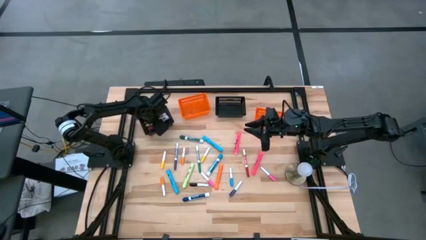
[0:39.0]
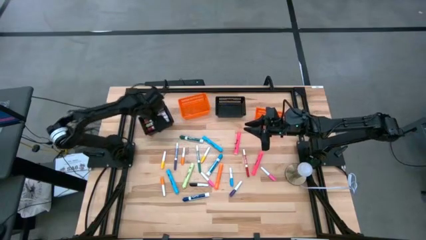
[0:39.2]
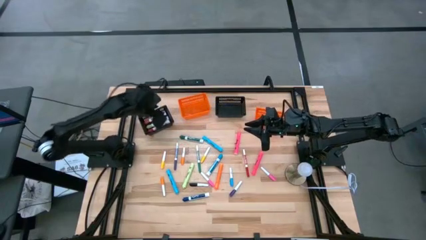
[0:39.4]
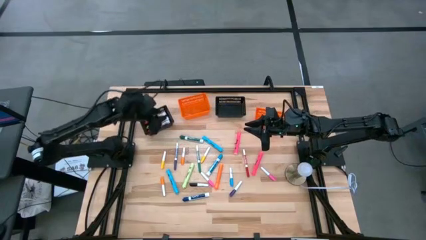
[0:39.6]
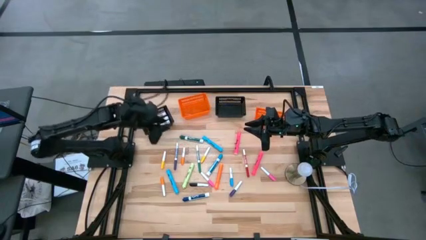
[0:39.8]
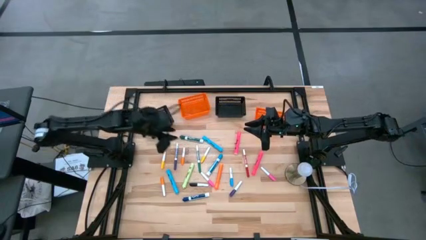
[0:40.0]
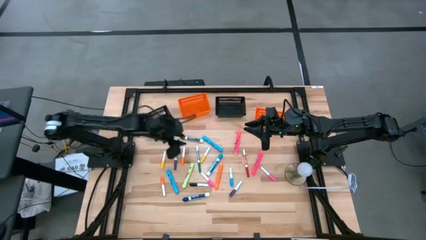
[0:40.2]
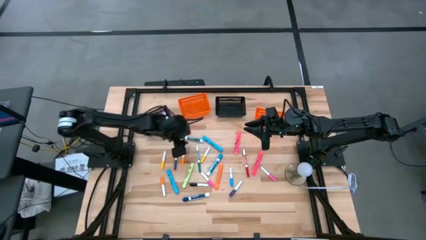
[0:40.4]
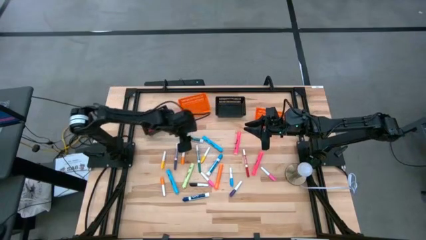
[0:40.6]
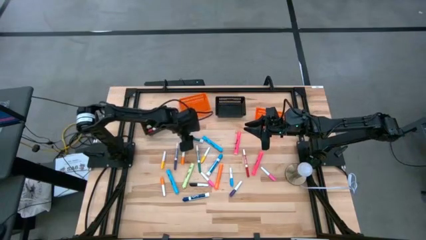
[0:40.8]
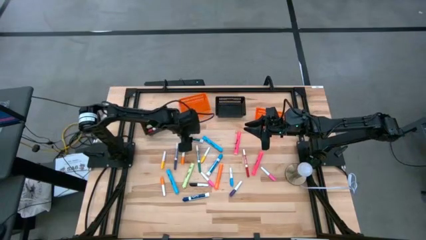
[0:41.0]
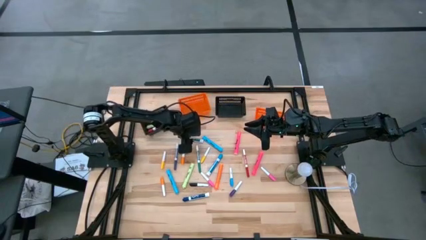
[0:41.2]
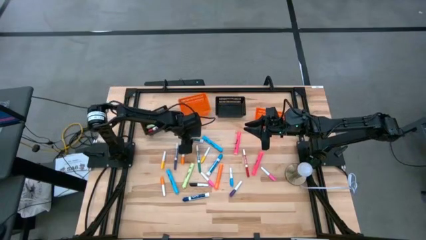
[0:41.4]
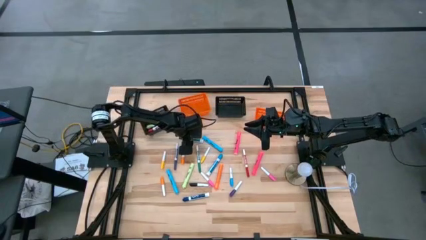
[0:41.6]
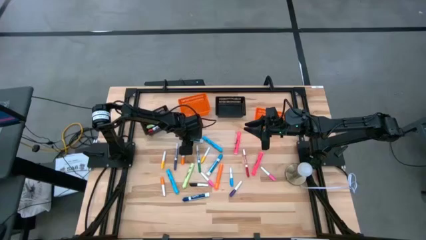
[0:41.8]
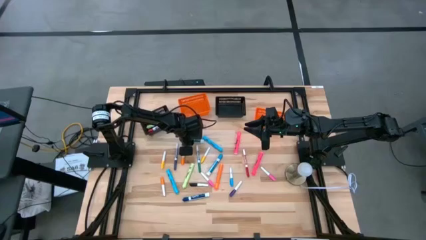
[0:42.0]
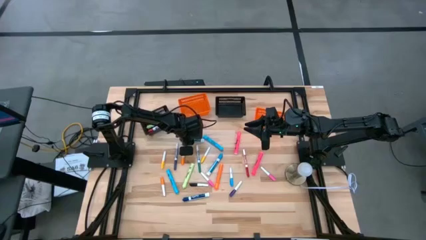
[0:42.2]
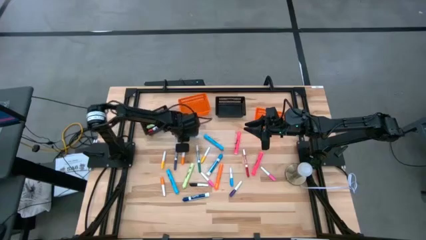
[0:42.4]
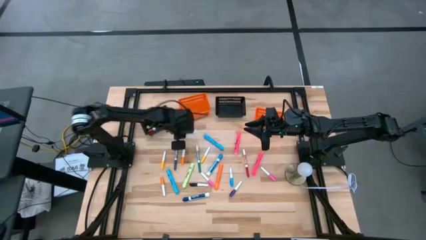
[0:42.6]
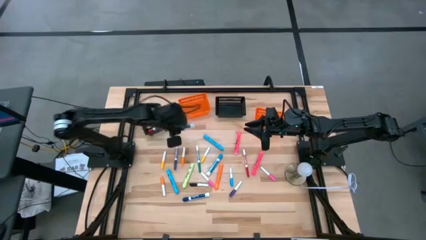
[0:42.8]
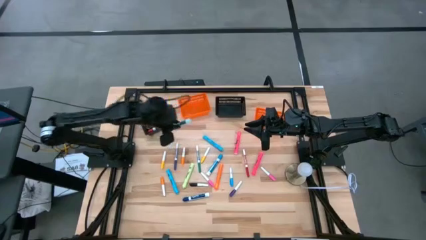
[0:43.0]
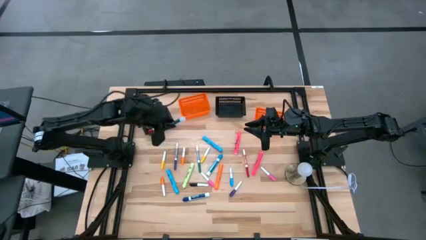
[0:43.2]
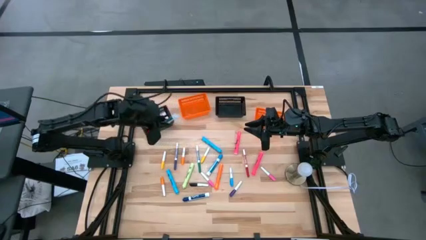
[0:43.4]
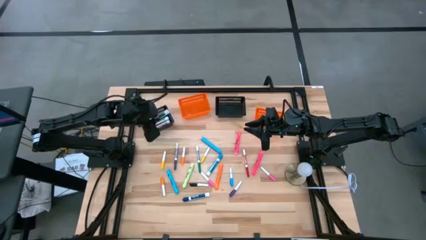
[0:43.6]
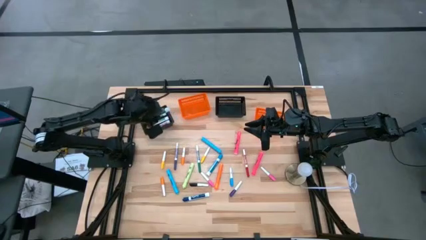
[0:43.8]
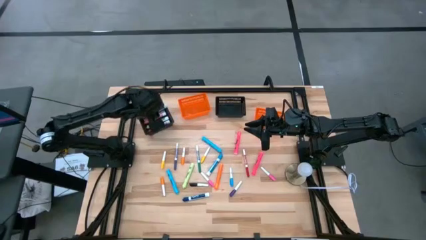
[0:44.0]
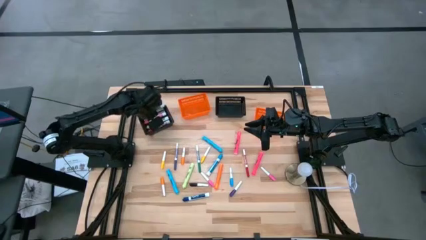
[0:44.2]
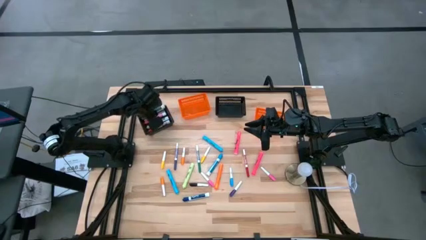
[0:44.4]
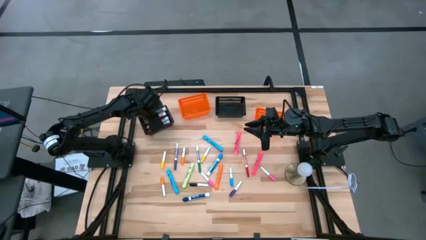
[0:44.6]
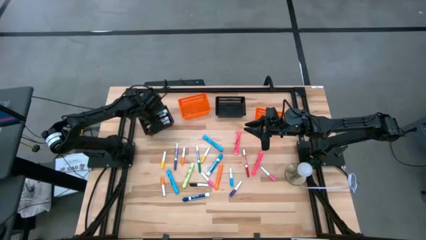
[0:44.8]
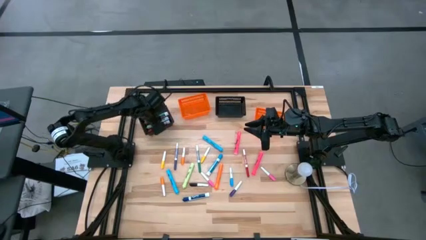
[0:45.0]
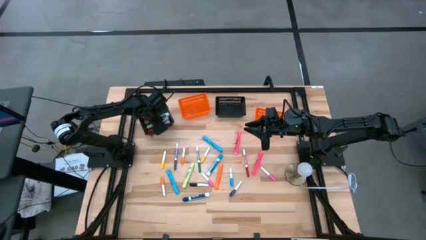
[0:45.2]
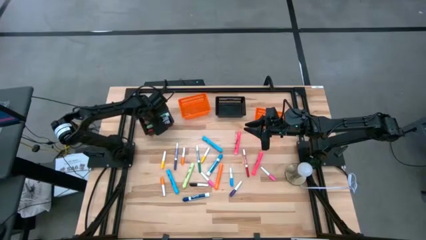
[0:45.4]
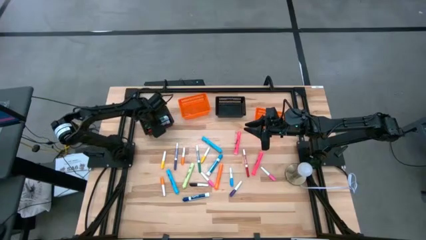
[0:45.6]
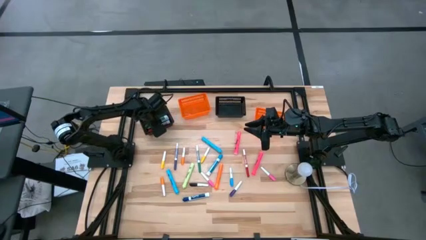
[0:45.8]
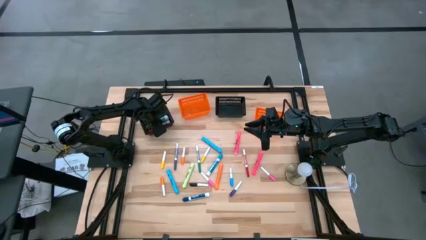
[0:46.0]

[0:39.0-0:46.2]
Task: Pick & Place Markers
Put the large green marker pen into the left black bin

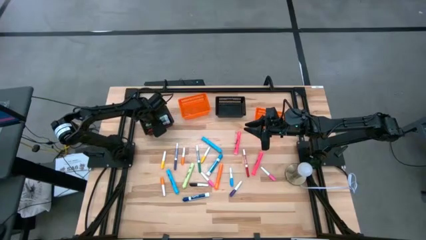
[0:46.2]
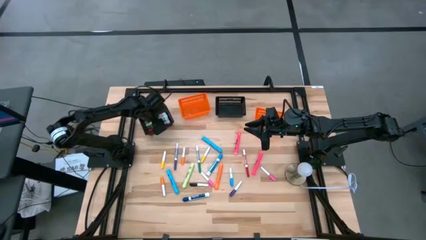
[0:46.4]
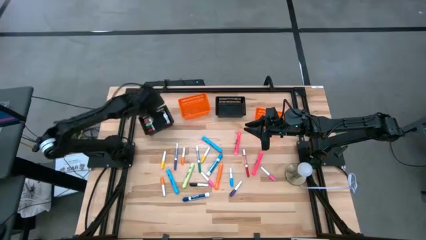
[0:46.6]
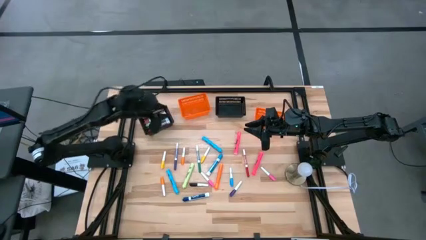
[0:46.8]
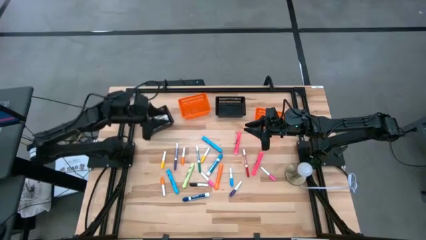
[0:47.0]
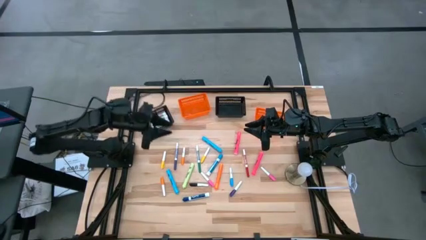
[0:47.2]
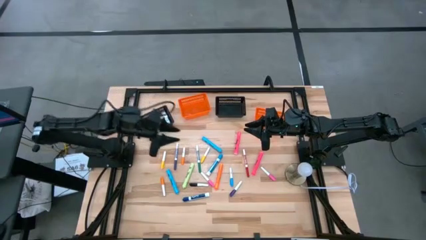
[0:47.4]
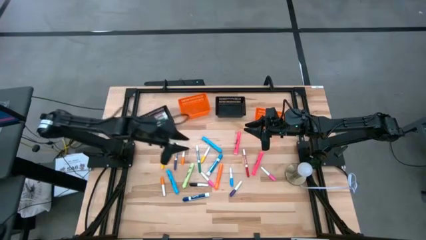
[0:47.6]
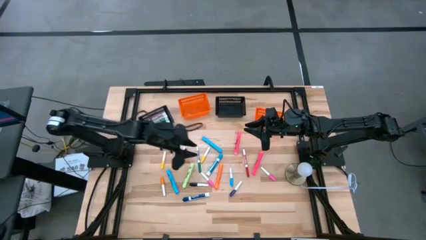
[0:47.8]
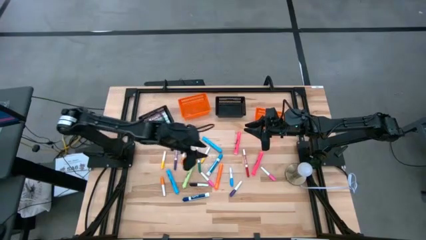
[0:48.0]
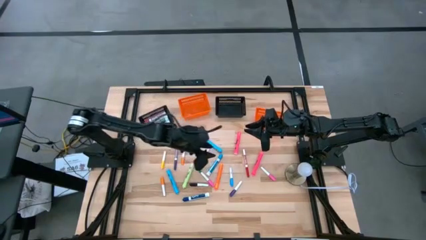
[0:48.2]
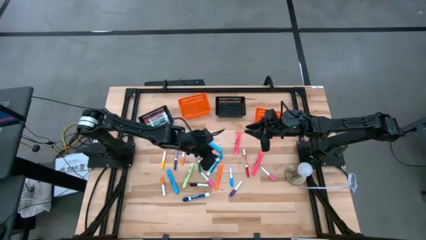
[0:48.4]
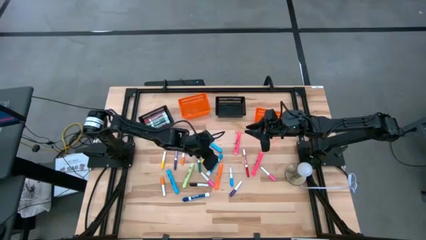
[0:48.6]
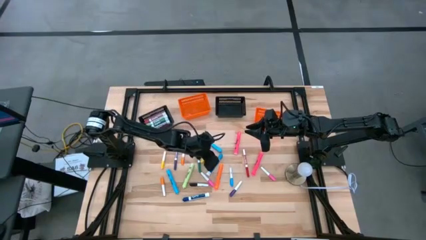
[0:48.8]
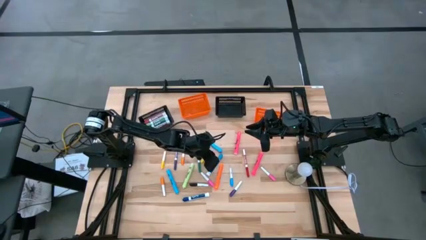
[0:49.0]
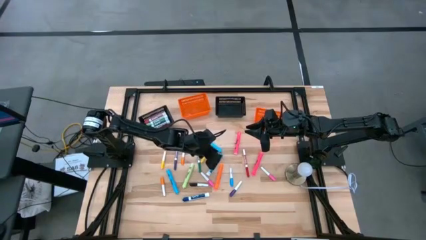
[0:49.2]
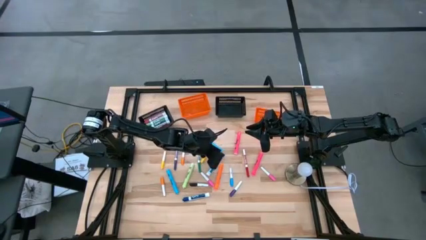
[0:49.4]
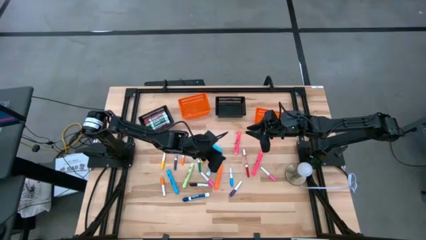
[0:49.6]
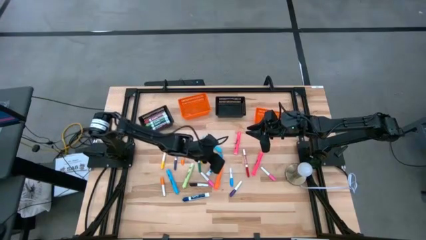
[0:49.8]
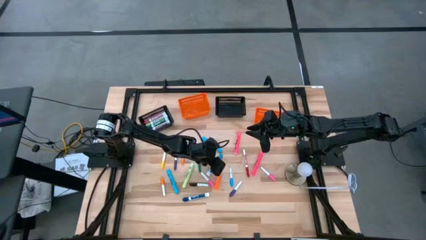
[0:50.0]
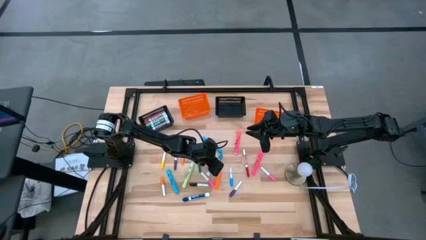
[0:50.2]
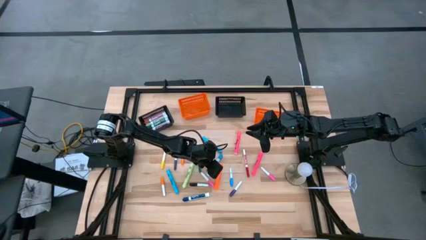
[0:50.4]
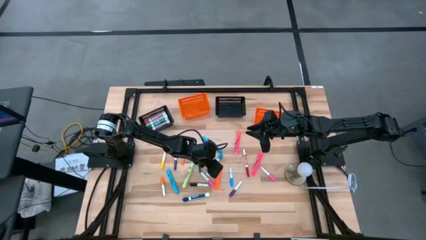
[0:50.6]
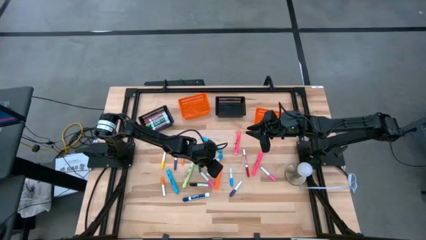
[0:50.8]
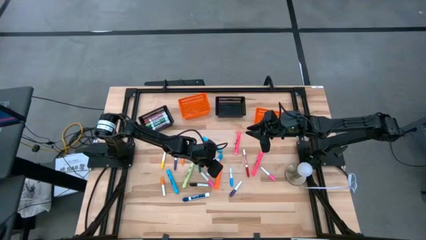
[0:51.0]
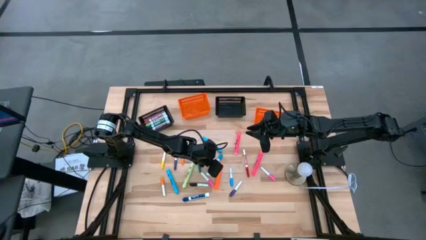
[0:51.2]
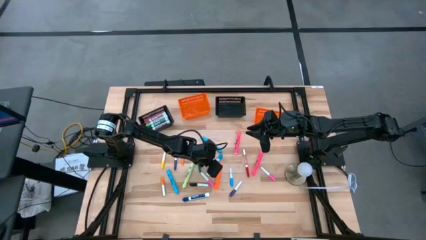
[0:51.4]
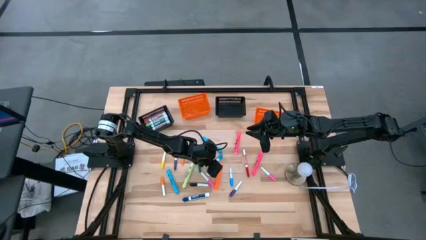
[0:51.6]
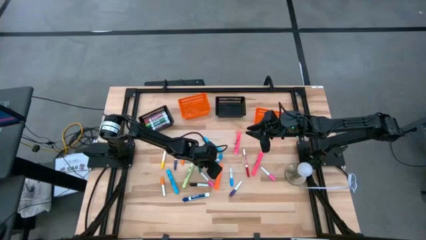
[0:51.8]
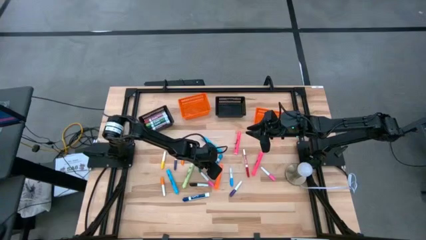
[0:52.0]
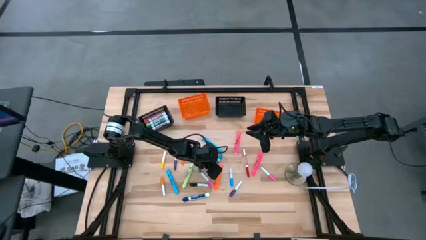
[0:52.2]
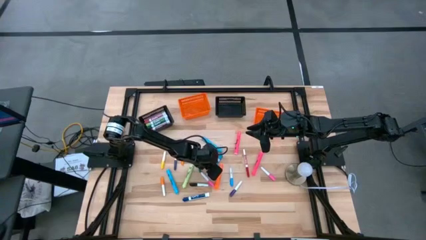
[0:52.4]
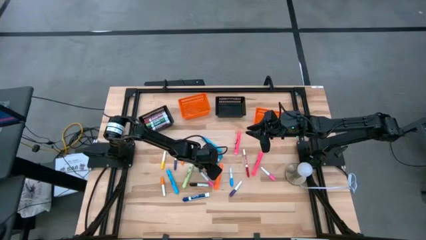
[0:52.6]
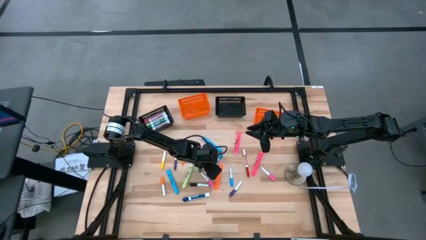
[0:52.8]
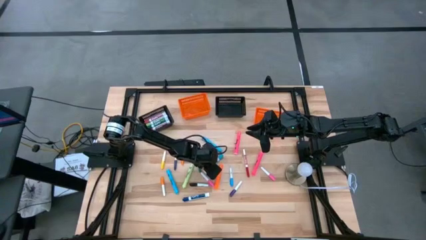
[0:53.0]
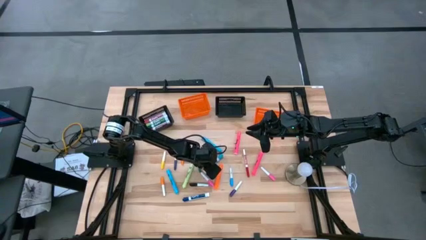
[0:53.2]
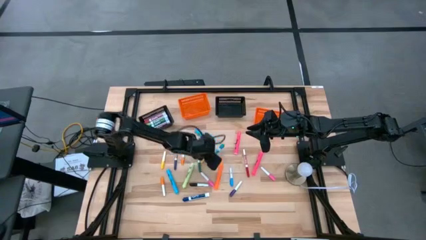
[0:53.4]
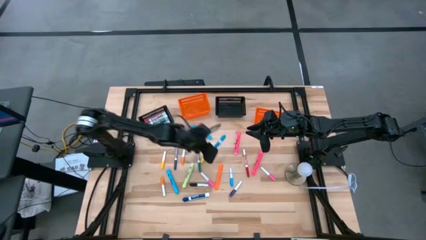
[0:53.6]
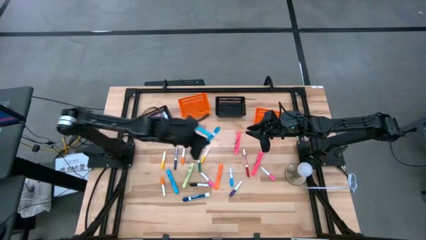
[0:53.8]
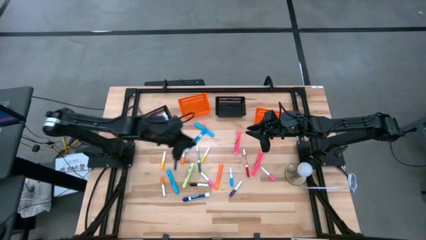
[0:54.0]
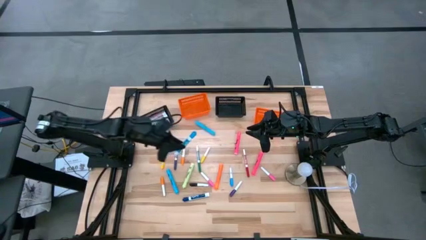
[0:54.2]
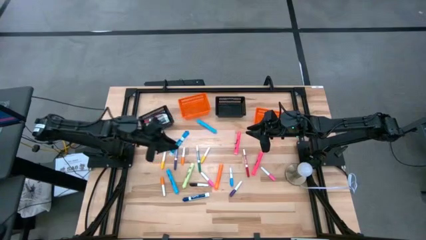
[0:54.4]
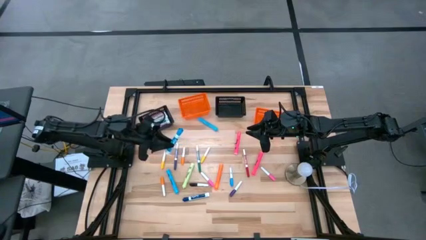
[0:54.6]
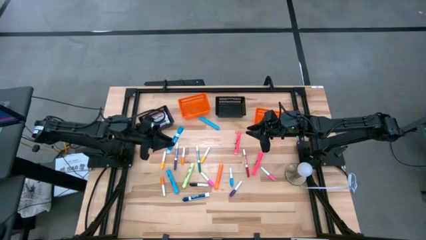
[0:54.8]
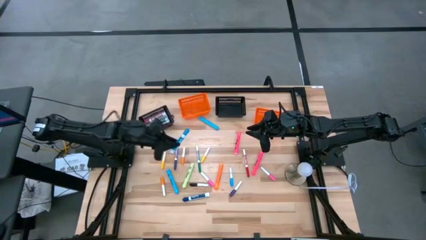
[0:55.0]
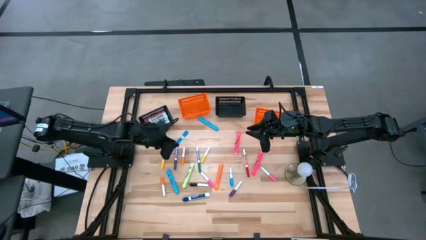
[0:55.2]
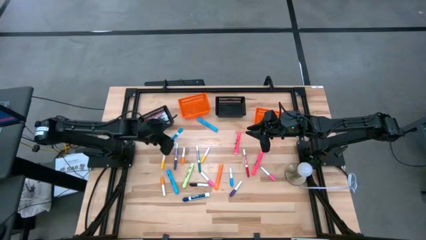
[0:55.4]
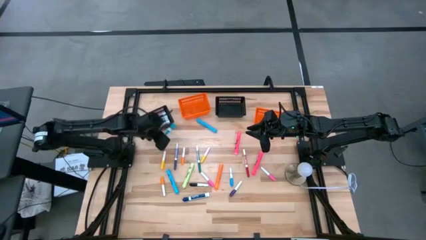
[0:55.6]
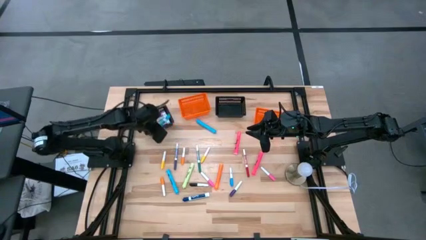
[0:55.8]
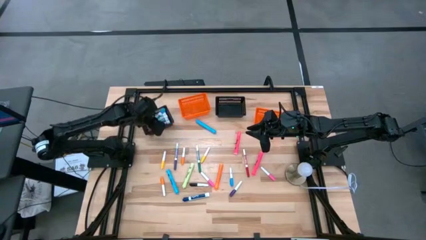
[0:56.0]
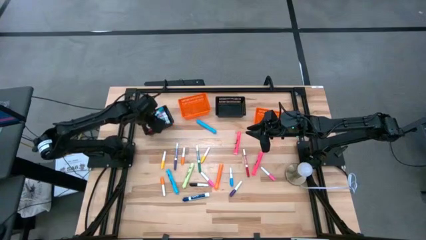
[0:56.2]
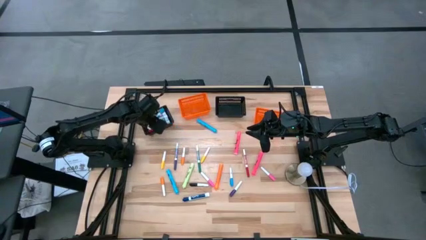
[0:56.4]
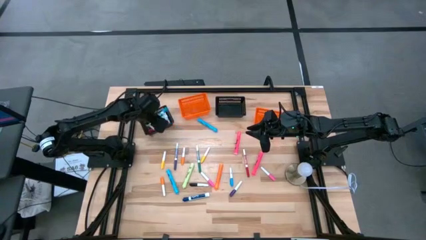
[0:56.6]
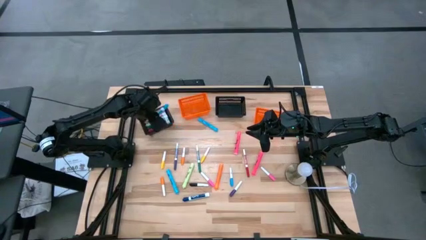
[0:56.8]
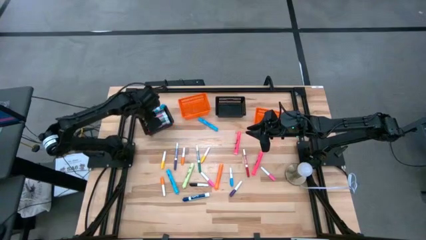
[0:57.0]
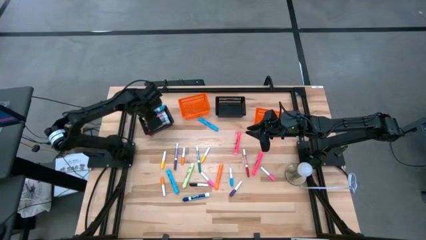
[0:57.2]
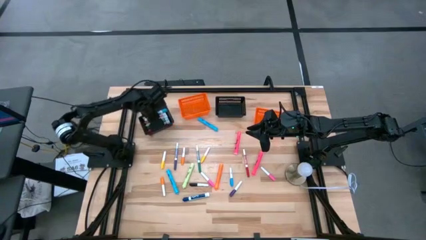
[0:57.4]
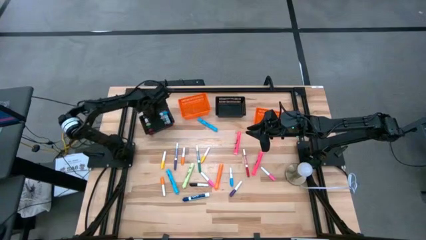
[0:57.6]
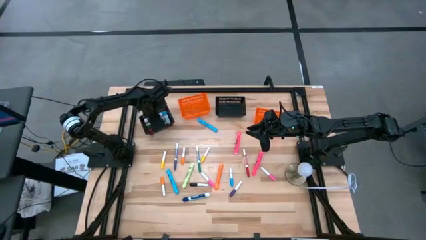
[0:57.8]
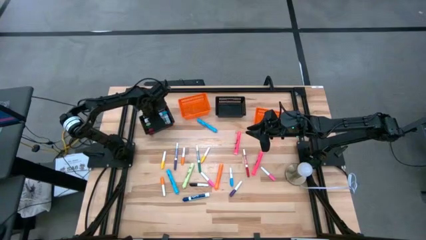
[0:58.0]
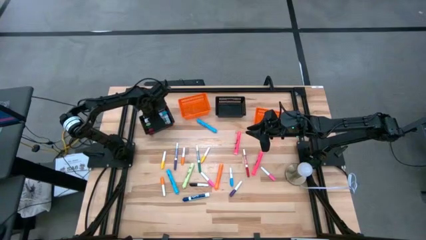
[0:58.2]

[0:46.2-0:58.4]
Put the large light blue marker pen into the left black bin
